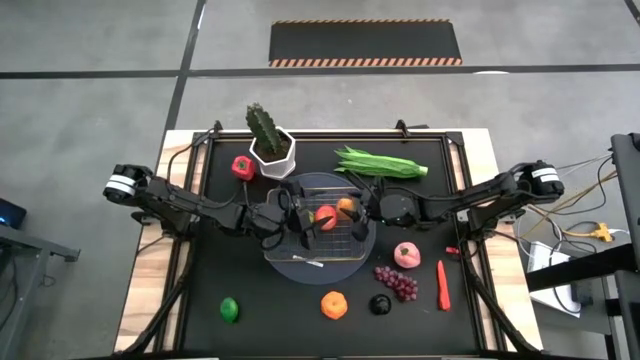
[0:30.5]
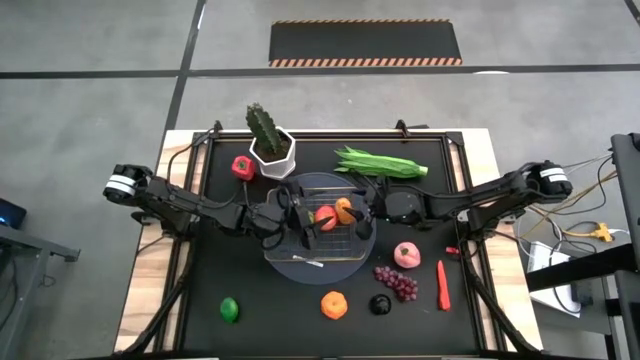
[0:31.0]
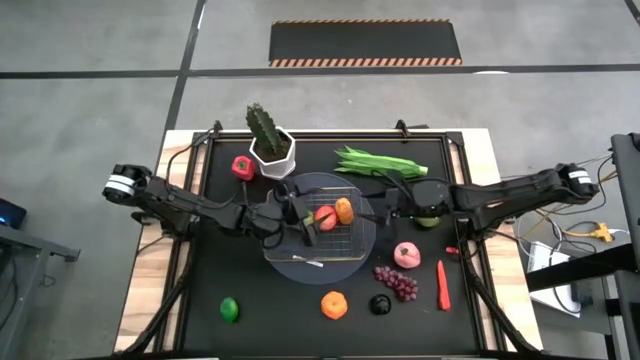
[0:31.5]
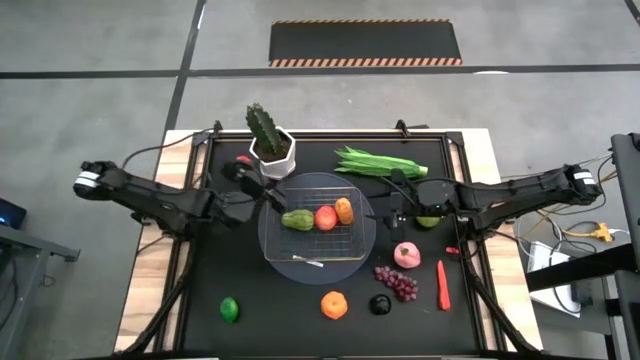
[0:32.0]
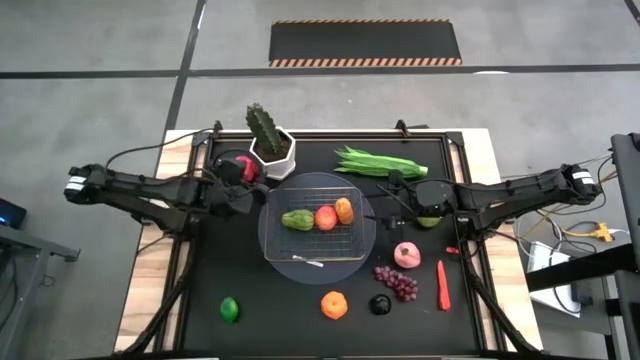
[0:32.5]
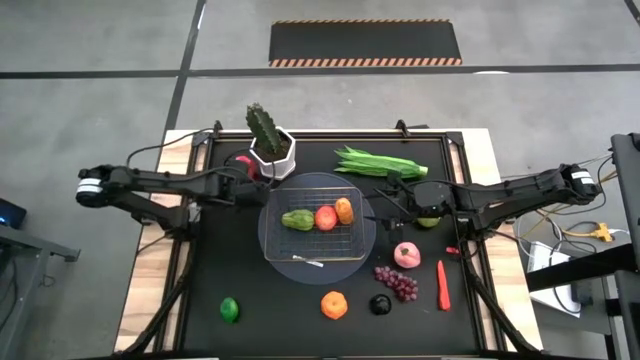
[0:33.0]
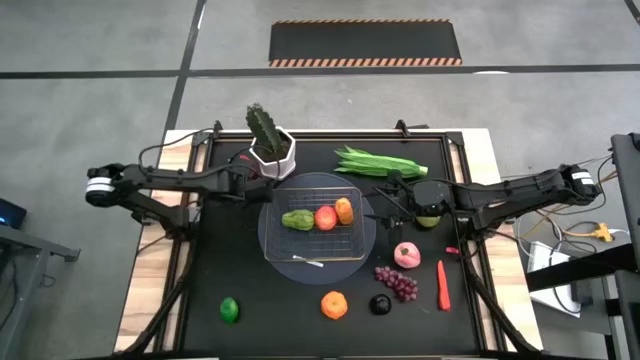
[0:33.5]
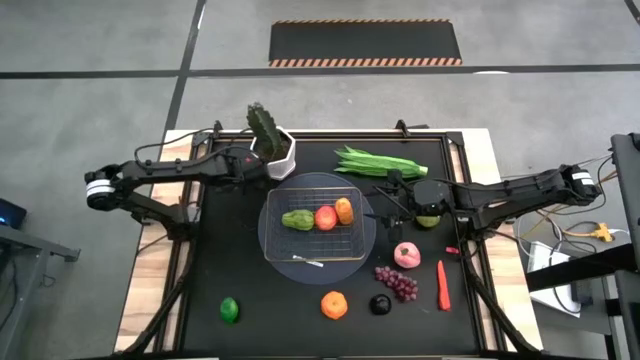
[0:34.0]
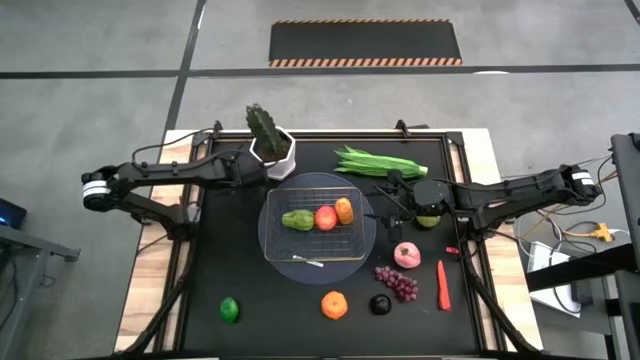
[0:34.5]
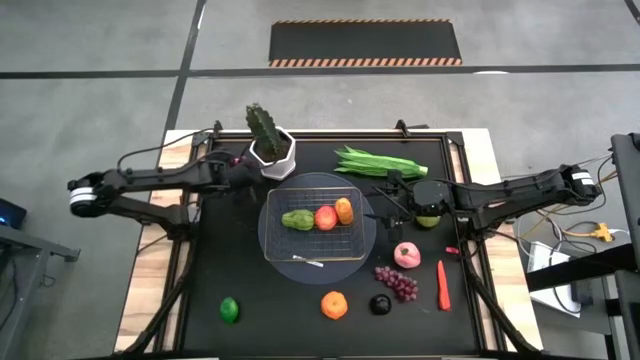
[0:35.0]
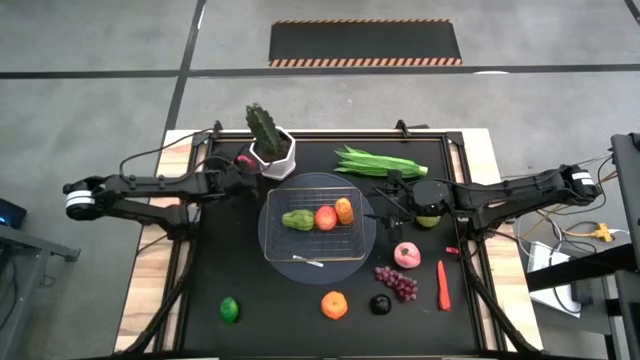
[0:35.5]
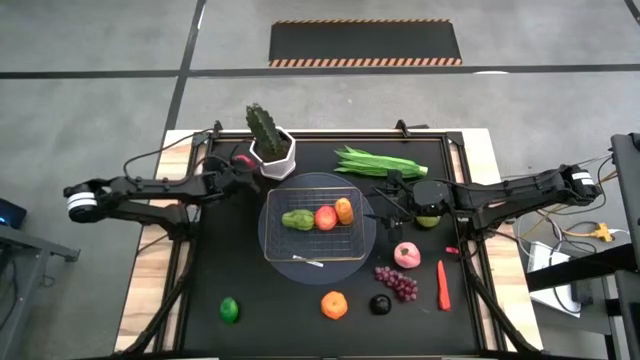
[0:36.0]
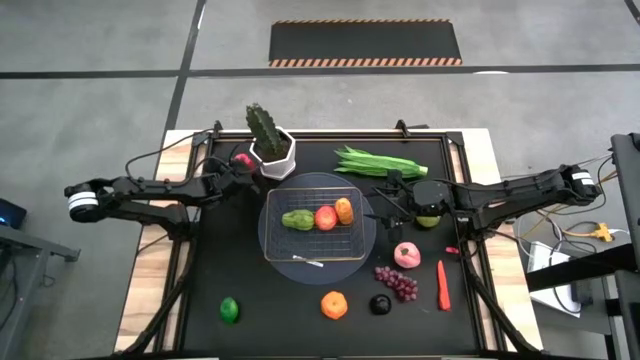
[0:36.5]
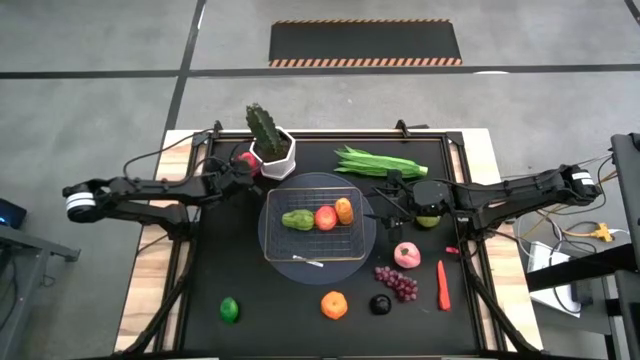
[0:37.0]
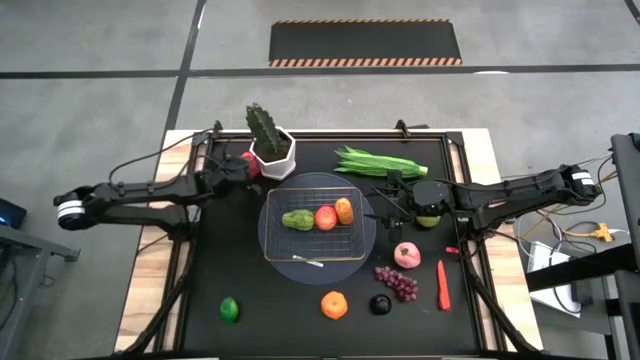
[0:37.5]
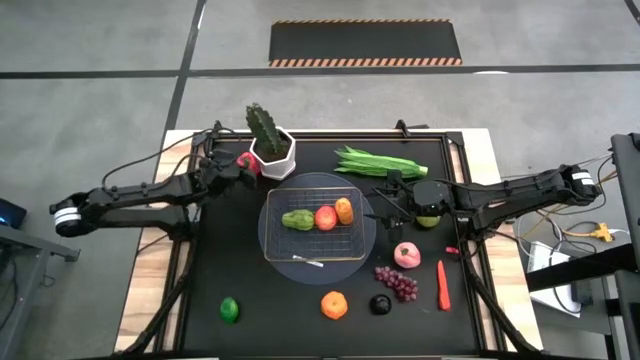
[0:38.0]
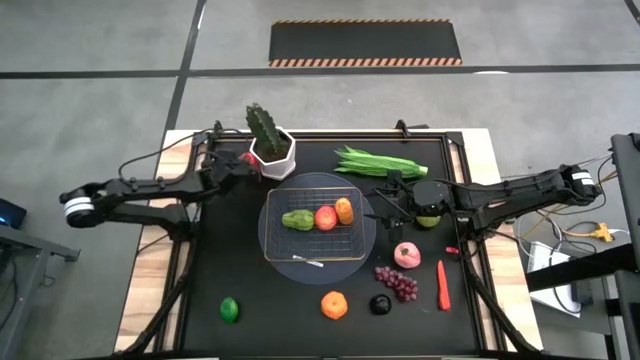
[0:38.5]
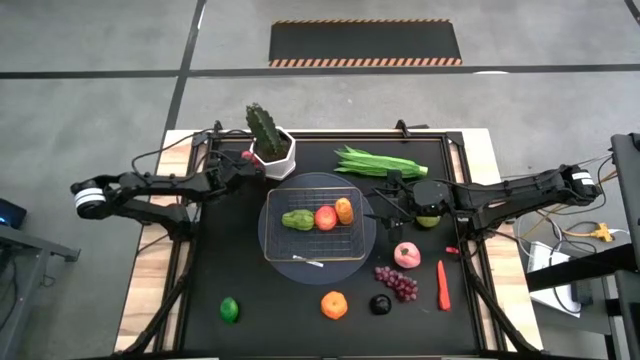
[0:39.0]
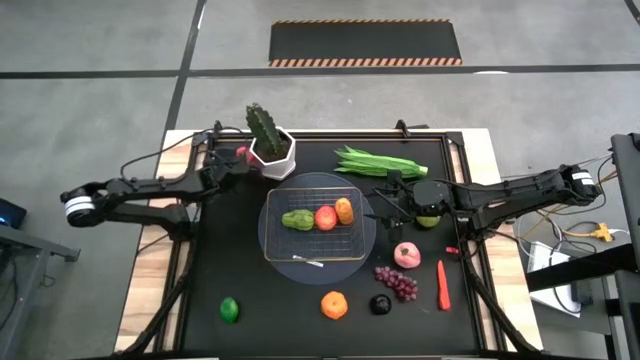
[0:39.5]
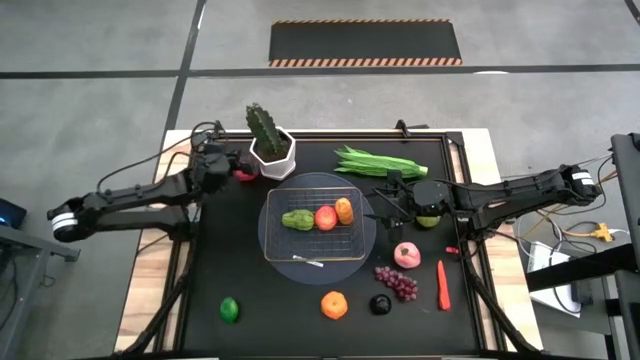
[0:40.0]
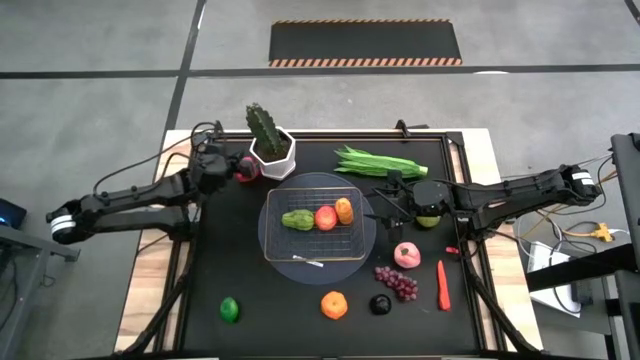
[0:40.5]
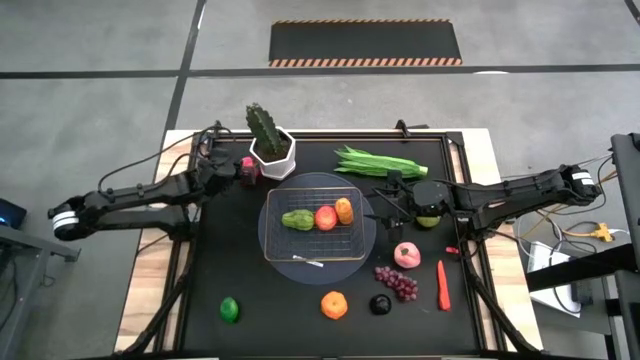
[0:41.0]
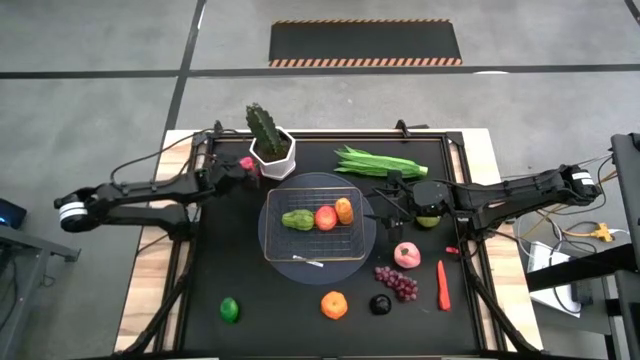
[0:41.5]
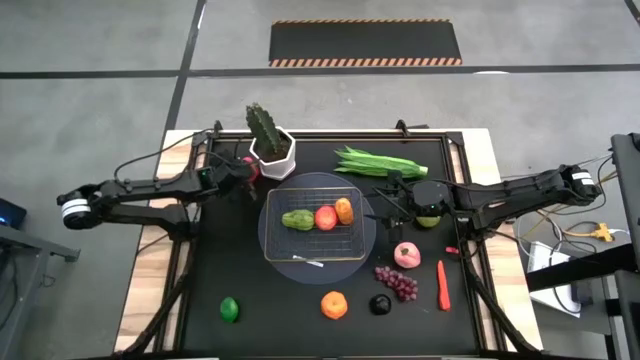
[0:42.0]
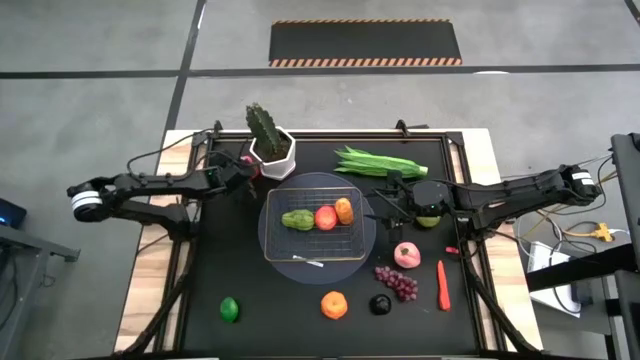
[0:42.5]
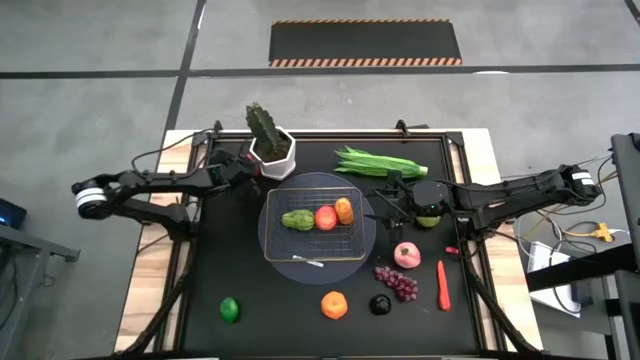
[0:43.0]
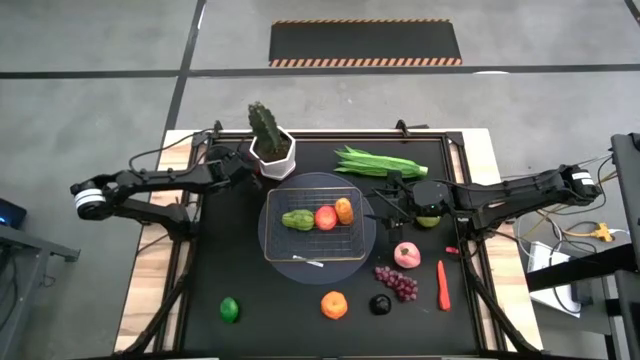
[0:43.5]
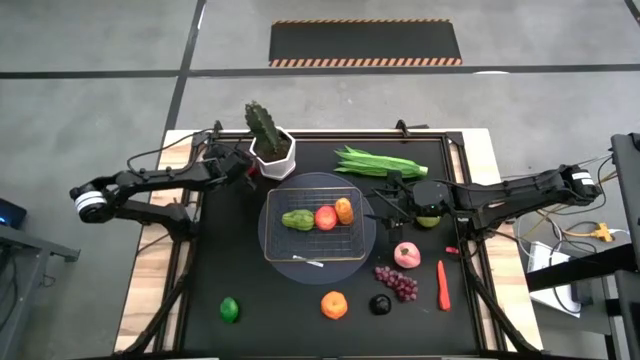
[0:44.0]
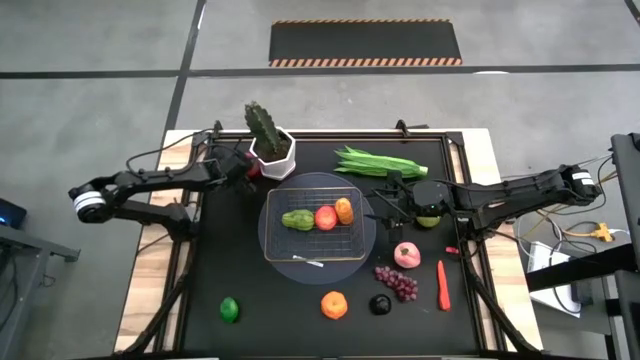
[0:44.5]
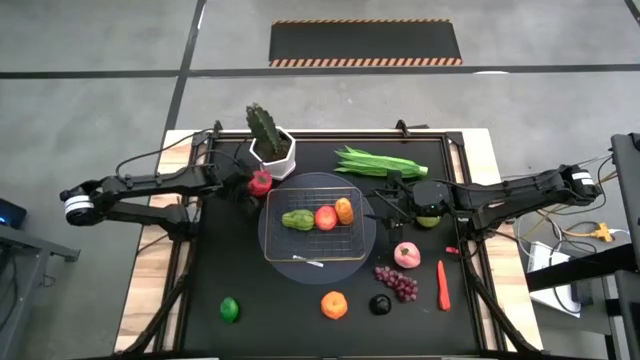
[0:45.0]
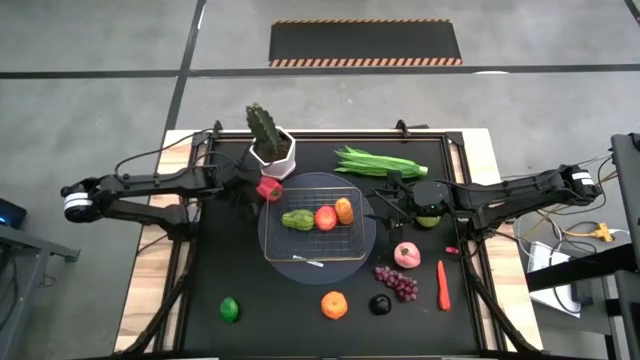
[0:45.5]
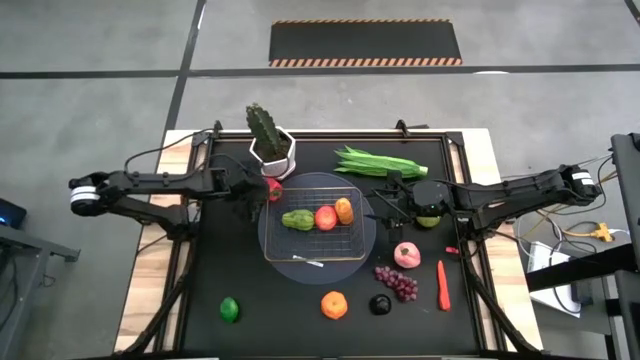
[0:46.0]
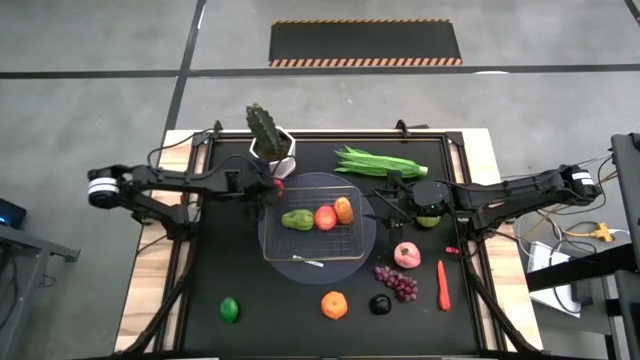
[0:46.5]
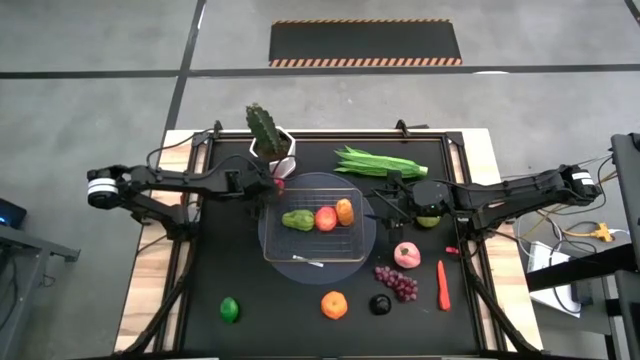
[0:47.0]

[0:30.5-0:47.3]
Task: Build produce basket
Put the bell pepper into the wire basket

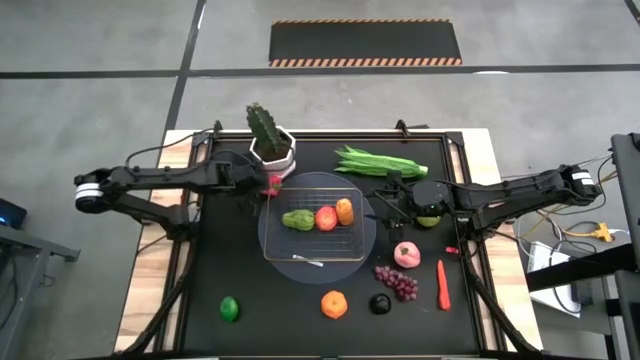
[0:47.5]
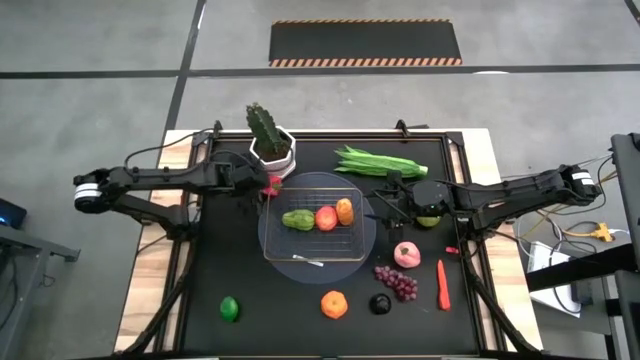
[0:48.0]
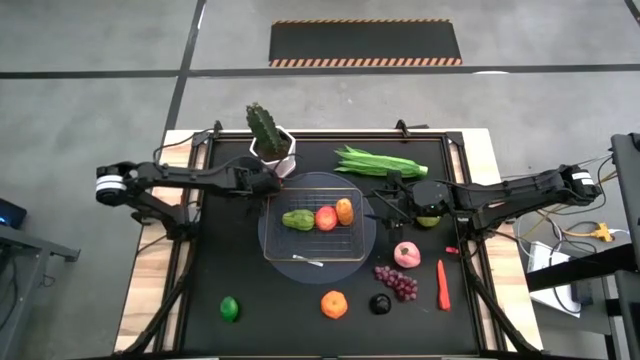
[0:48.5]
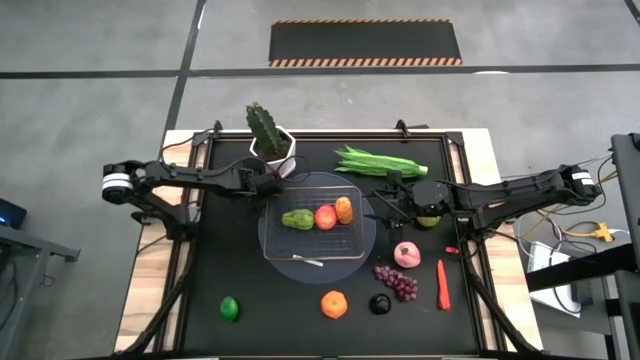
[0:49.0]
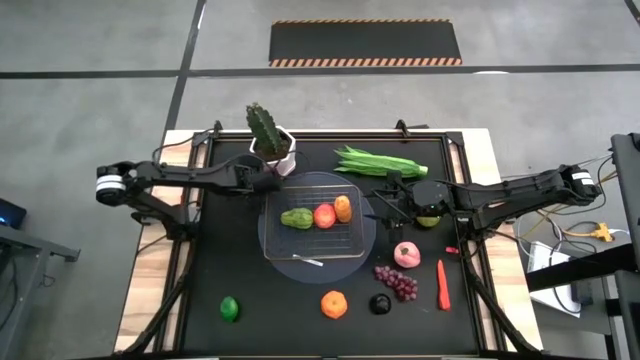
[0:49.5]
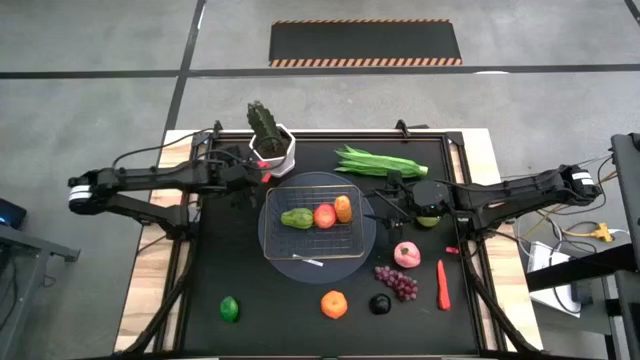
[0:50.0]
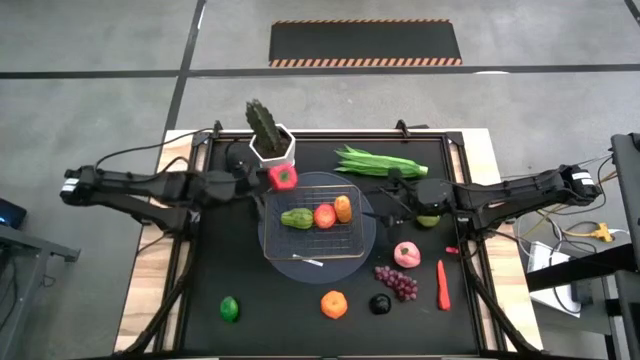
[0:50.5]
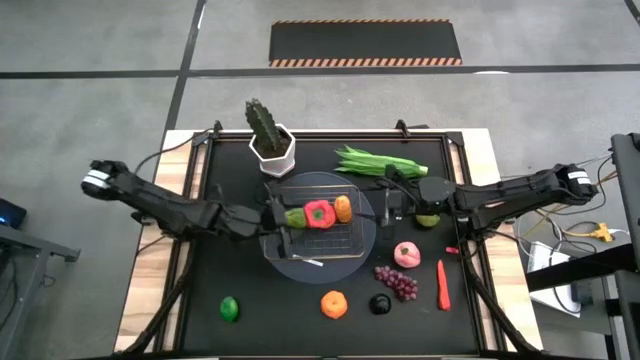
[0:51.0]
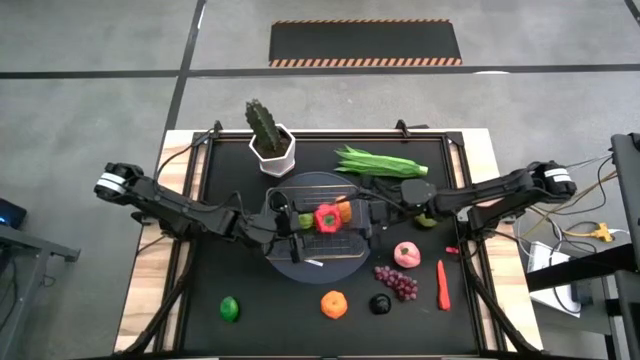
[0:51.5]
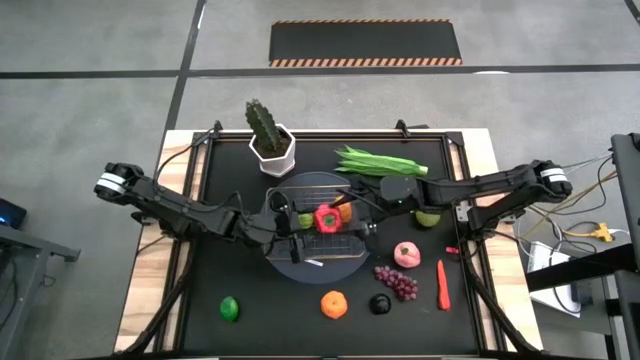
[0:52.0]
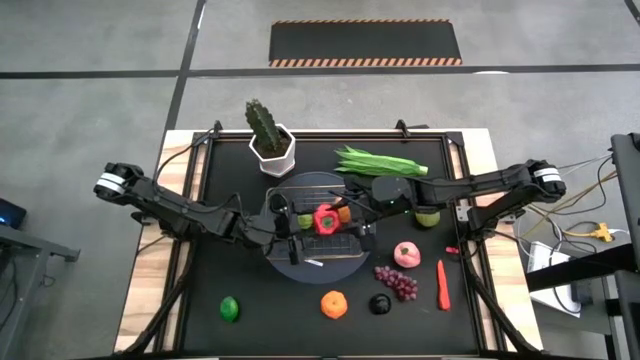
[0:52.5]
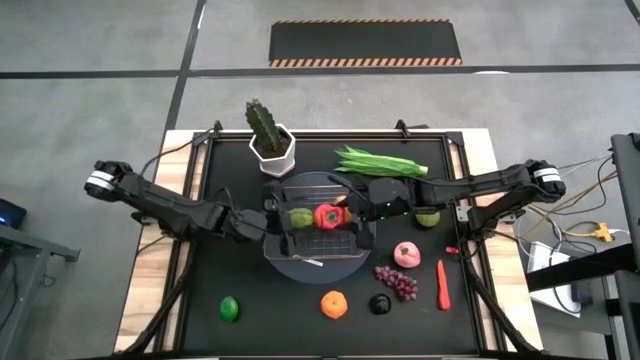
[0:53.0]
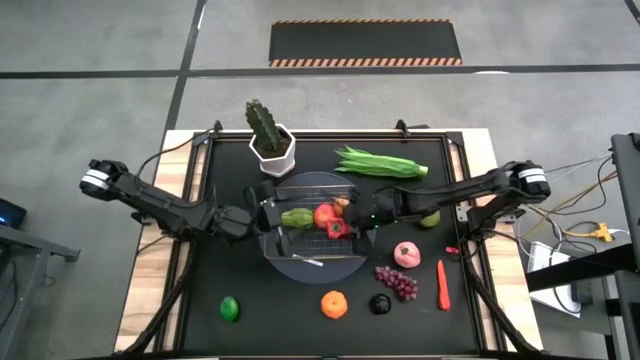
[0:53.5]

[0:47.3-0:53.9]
Put the bell pepper into the wire basket
